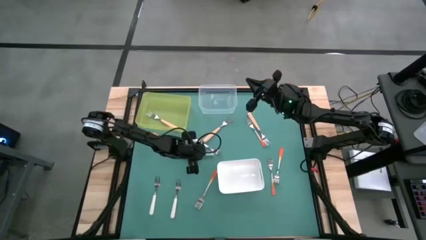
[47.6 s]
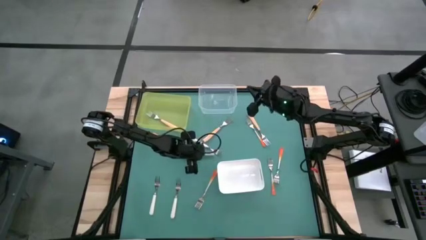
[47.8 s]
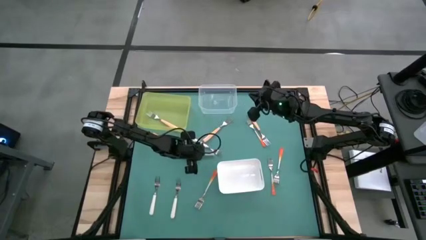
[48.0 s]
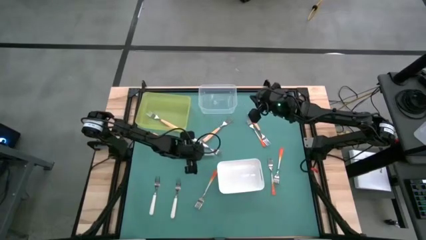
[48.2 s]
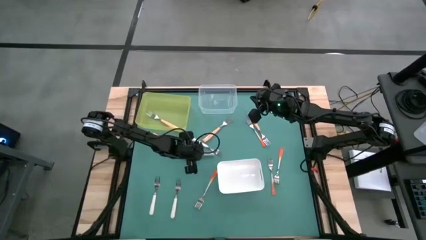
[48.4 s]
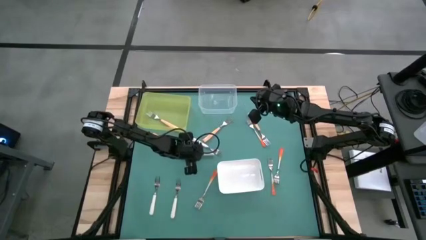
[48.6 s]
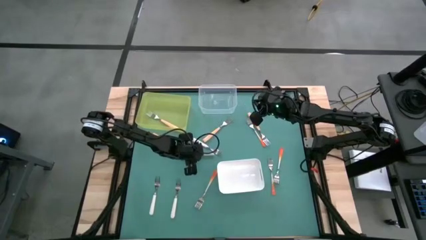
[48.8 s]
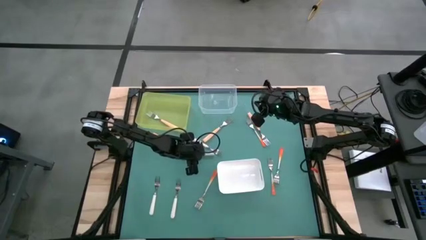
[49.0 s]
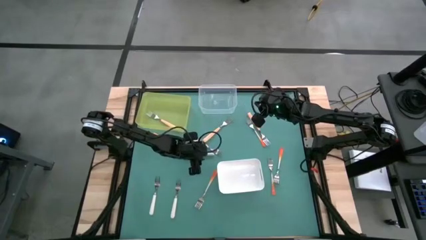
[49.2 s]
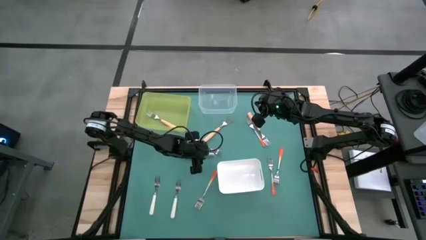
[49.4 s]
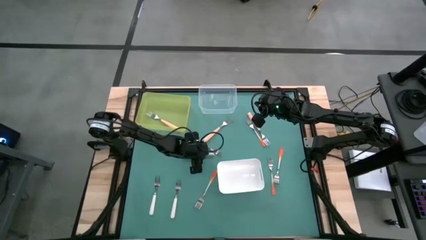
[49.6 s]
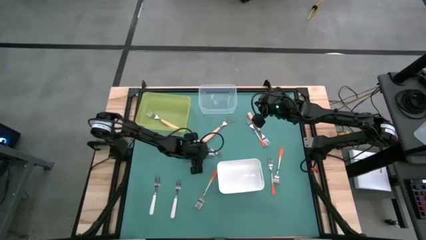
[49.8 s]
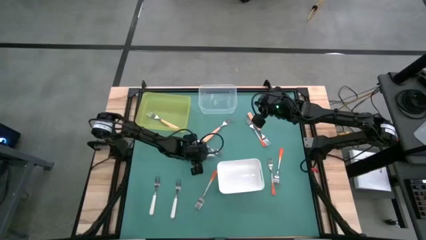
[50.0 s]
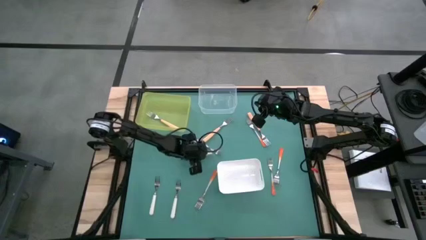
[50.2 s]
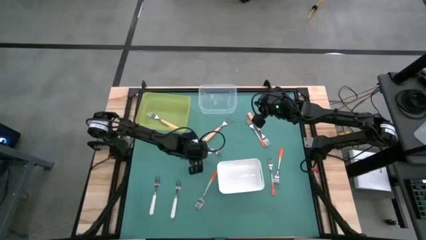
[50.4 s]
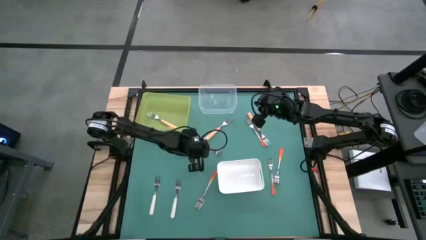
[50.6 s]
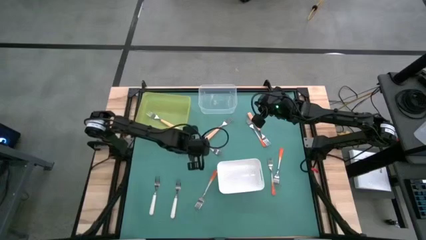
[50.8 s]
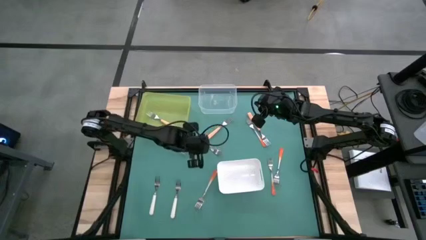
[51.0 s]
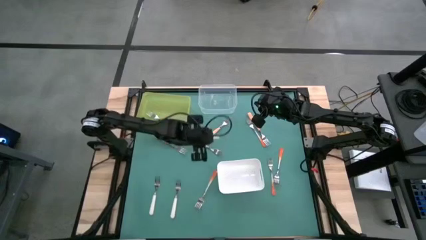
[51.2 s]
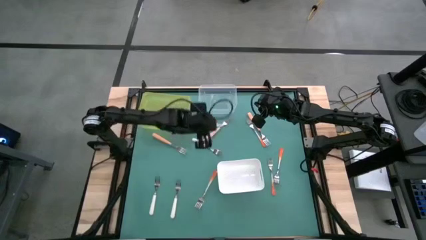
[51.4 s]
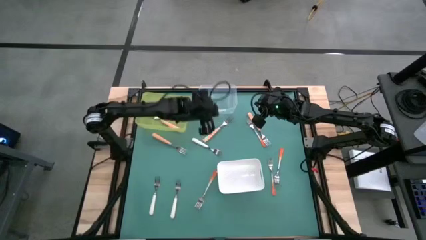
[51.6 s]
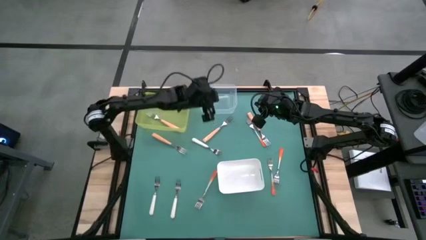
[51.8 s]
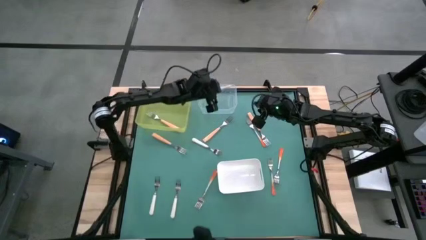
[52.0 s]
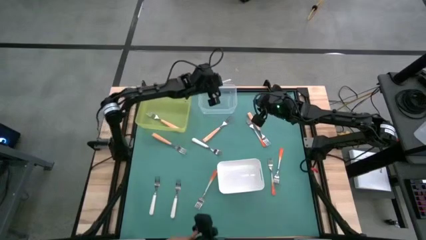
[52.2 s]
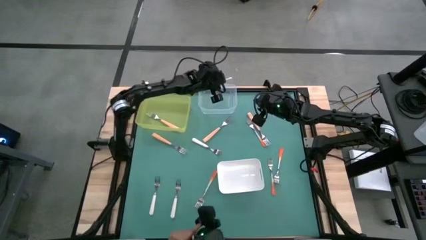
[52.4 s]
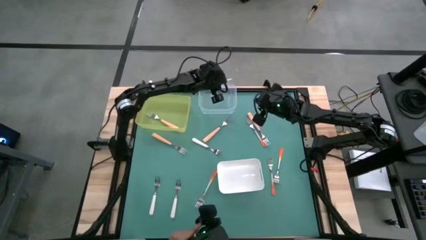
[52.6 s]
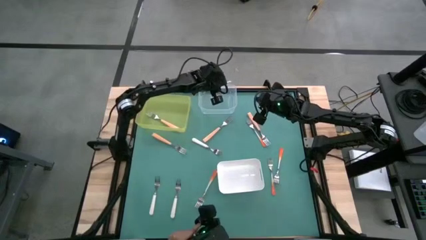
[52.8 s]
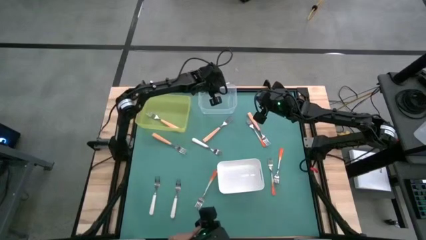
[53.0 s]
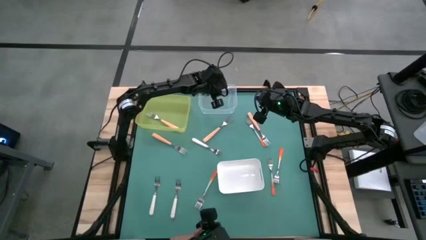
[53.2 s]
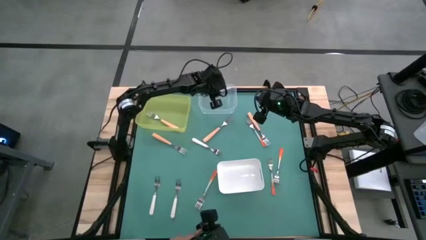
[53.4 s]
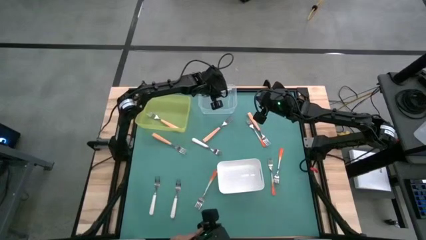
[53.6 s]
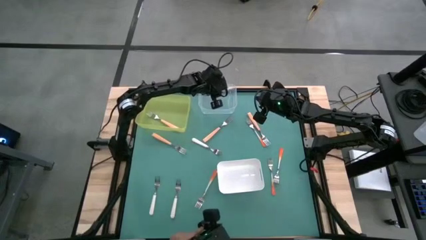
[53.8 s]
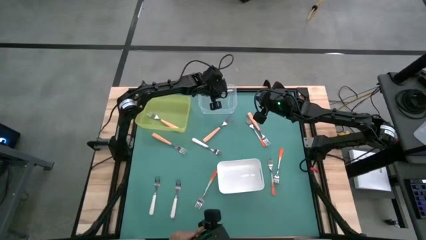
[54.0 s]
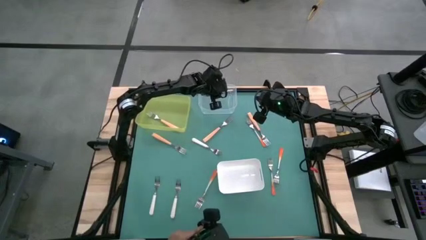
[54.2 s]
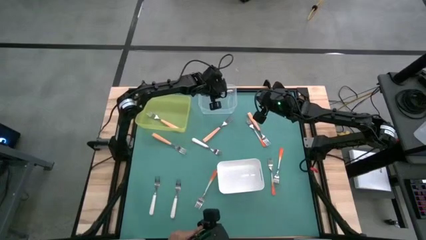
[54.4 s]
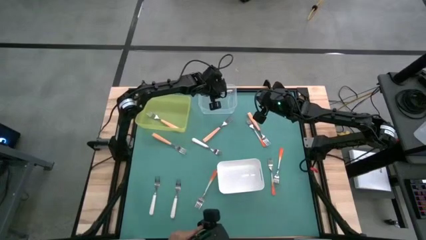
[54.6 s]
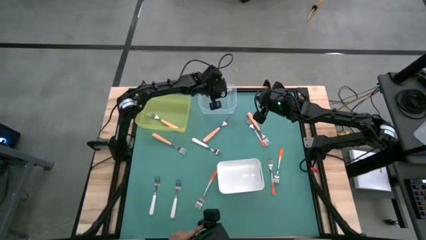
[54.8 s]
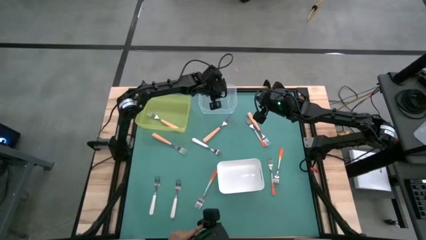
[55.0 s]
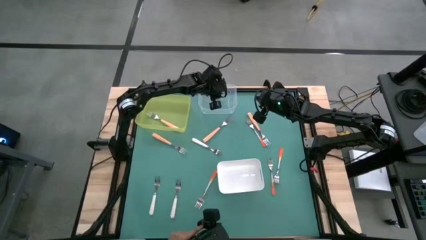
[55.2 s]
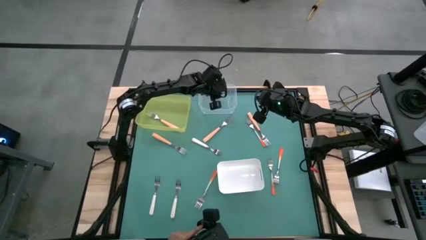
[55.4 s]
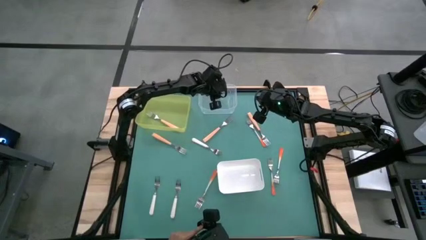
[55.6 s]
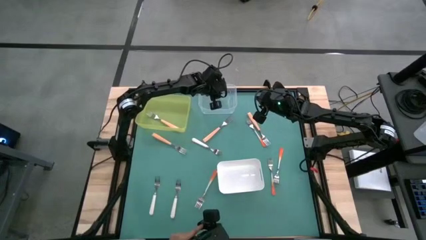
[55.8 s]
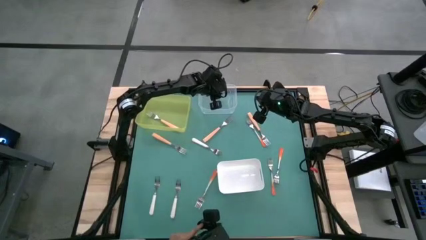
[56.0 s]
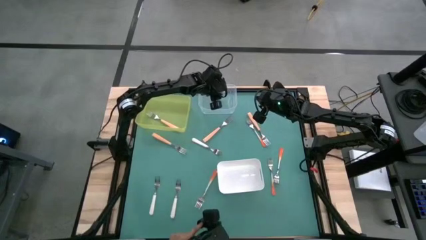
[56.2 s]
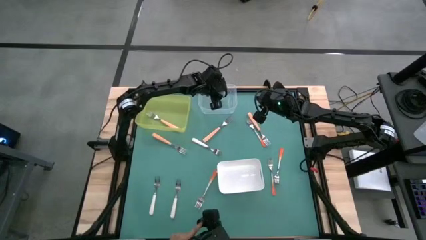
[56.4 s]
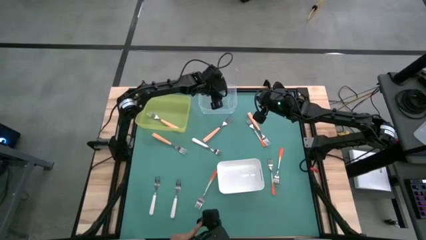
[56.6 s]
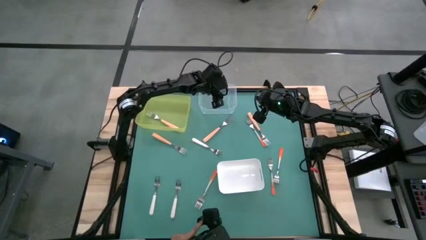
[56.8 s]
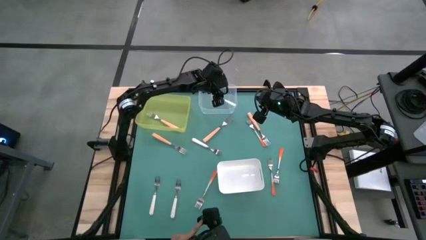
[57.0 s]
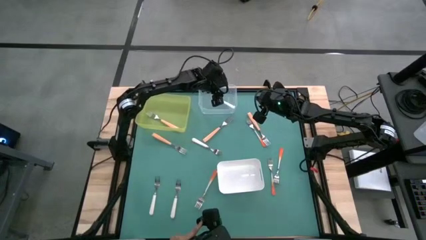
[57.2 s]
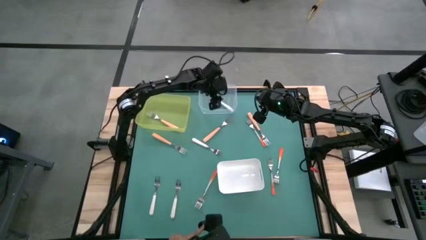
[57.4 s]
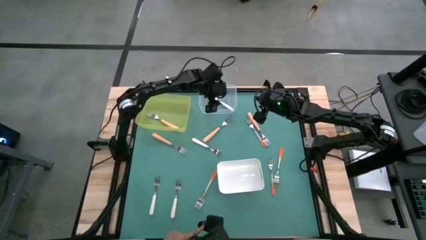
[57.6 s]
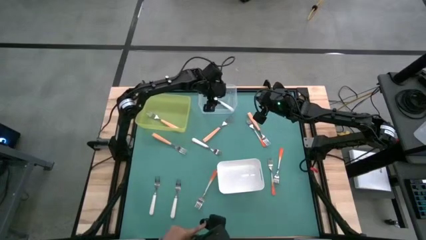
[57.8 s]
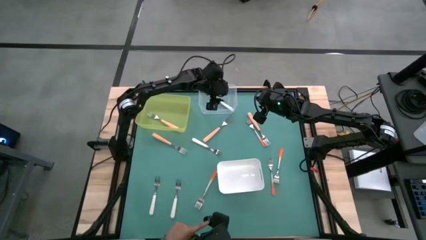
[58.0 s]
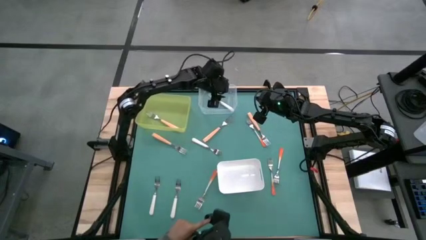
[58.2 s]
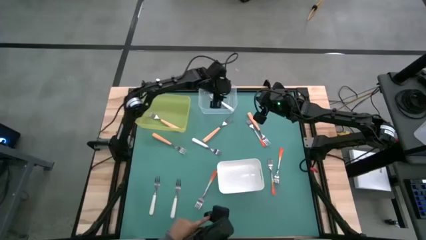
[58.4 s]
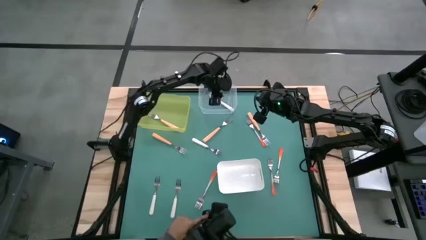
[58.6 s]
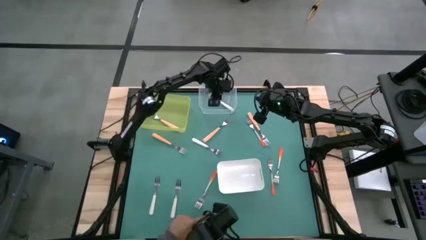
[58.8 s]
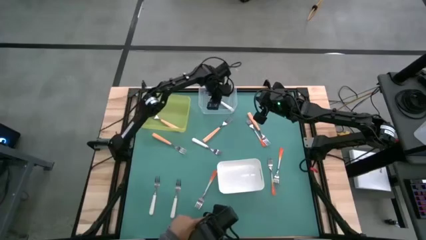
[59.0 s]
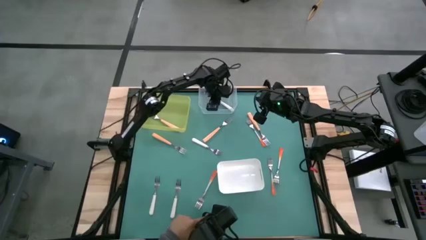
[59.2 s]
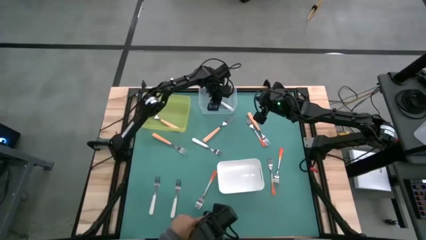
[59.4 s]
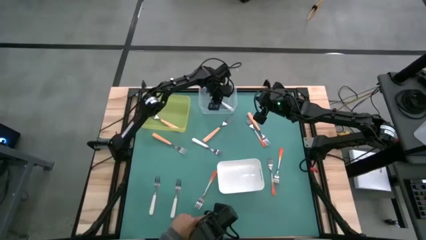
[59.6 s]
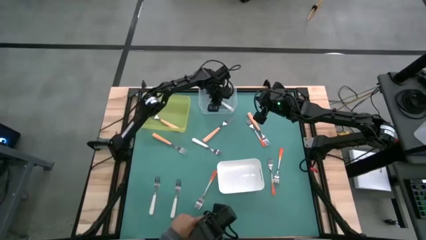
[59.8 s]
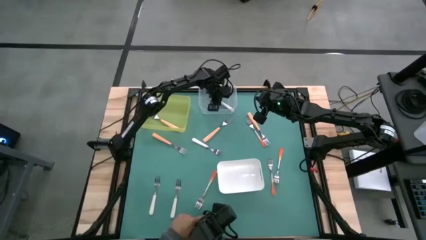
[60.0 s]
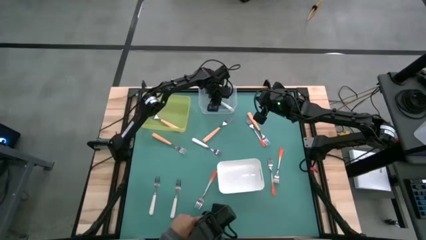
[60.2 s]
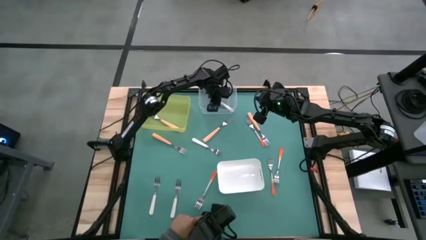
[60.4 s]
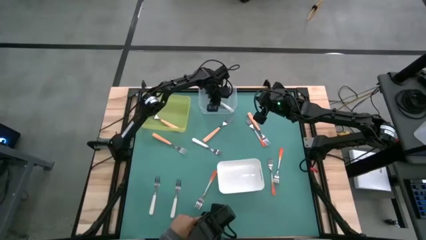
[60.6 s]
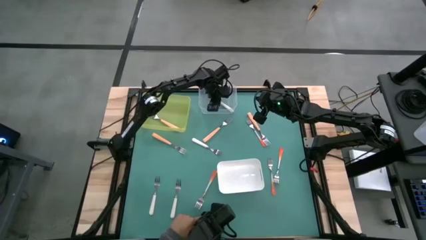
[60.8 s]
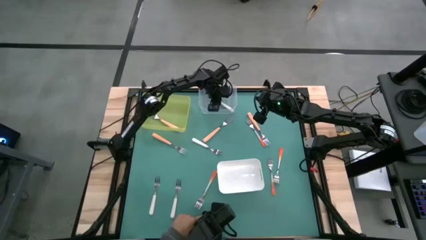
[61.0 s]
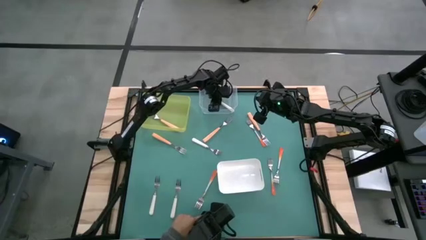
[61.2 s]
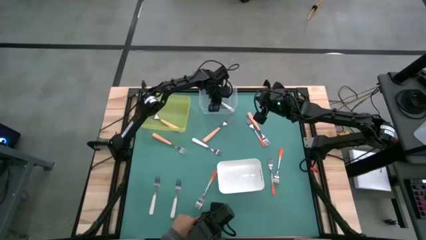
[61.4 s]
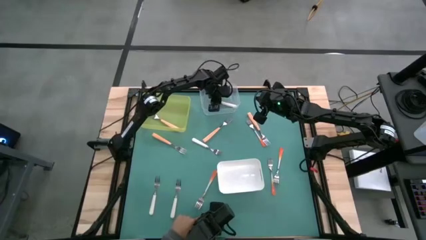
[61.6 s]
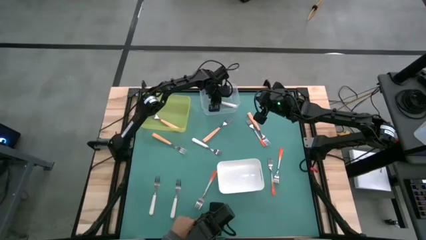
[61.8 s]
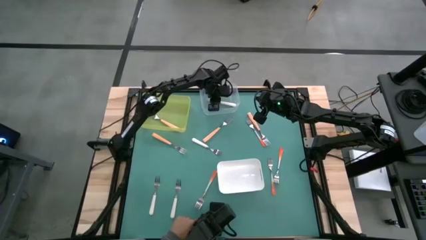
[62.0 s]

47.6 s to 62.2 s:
Task: Sort silverware by color (type)
Put the white fork into the transparent bin

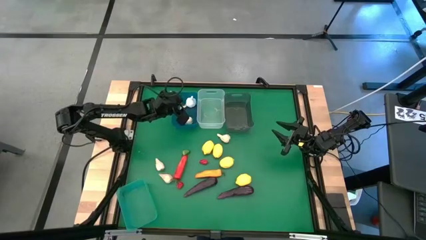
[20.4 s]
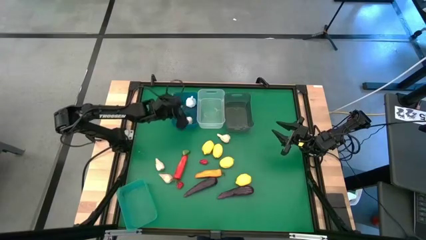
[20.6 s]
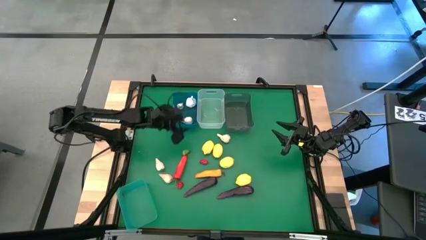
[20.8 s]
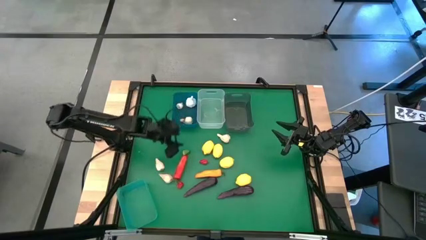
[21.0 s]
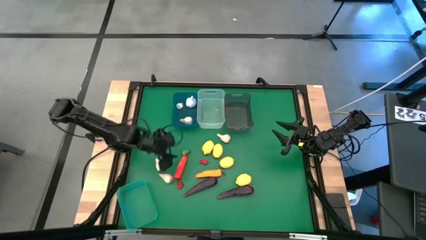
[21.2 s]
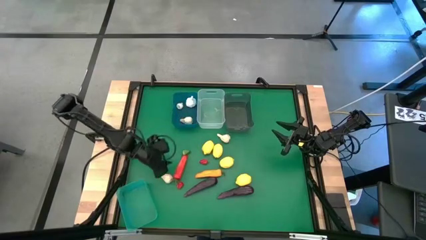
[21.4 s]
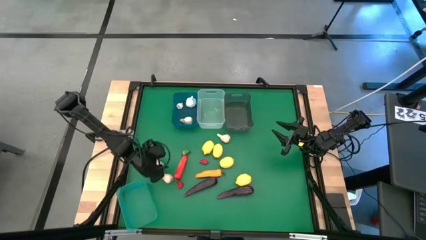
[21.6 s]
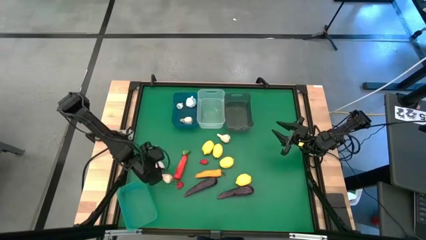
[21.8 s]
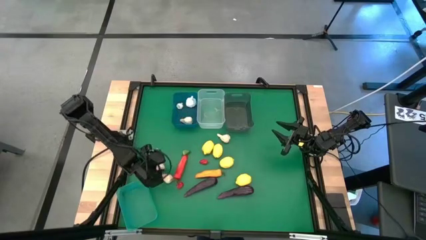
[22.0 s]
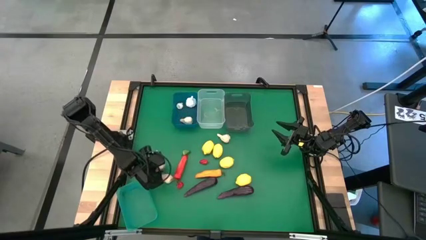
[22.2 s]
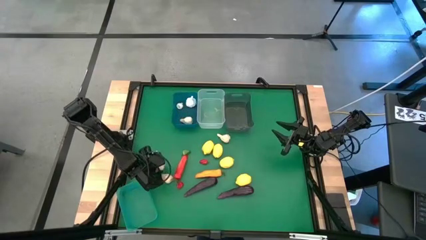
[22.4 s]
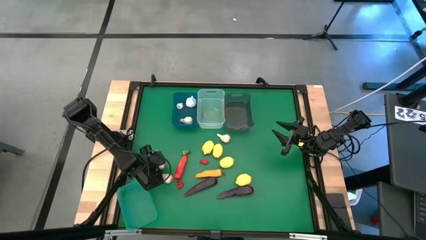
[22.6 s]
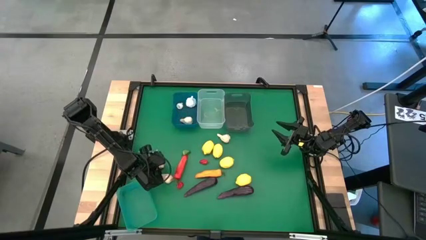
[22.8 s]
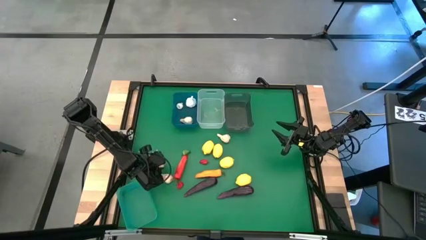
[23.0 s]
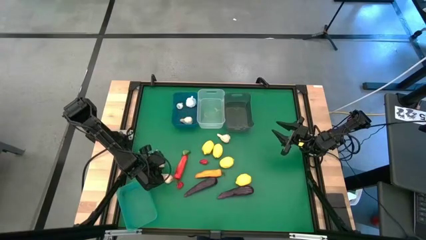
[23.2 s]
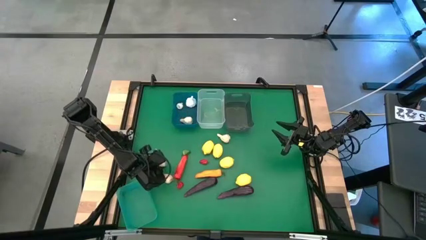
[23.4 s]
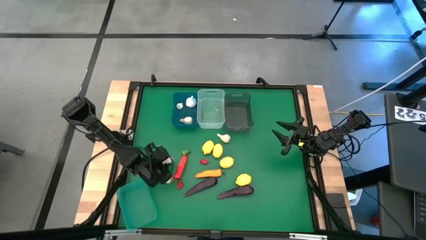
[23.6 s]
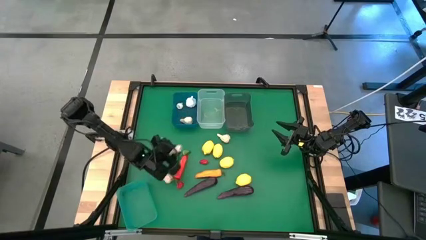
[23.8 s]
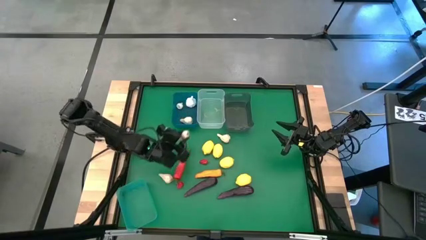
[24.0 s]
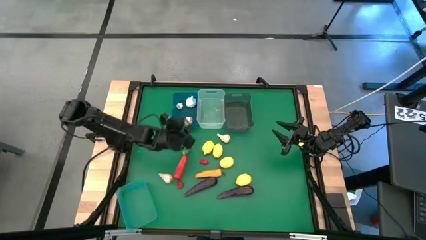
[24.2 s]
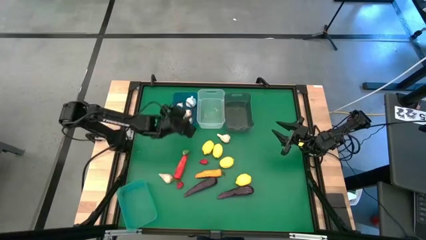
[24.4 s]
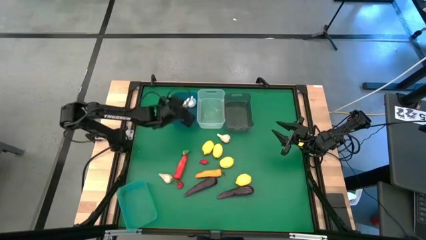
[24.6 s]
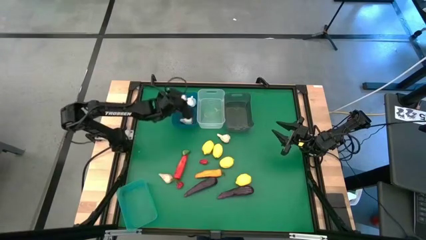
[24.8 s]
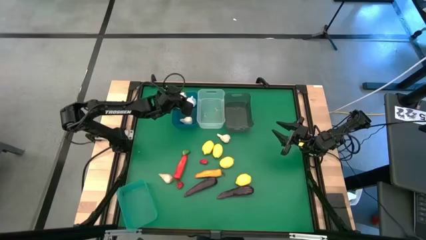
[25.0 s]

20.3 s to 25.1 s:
Task: Sort produce into baskets
Put the white garlic into the blue bin
